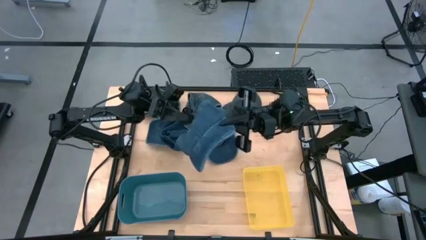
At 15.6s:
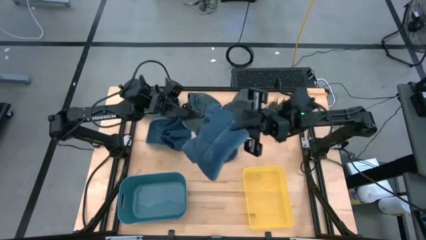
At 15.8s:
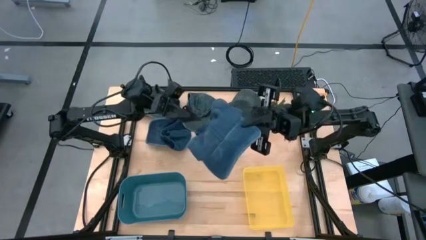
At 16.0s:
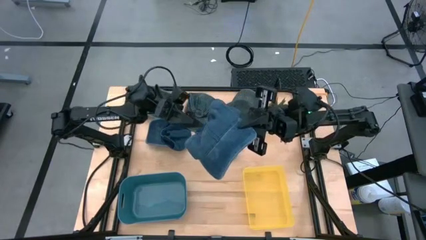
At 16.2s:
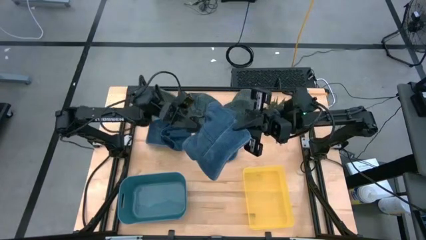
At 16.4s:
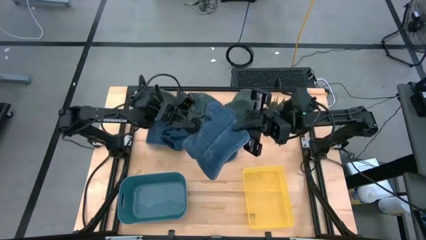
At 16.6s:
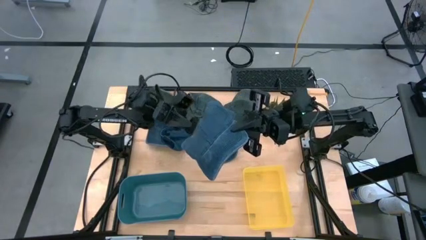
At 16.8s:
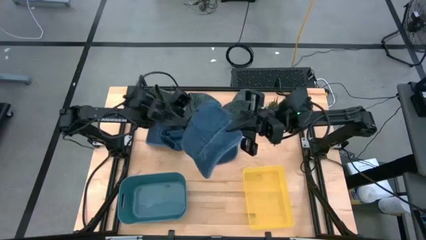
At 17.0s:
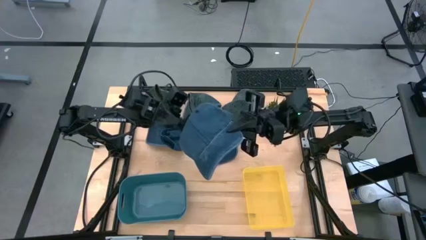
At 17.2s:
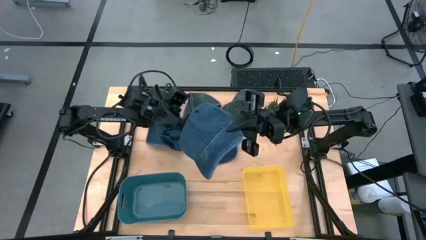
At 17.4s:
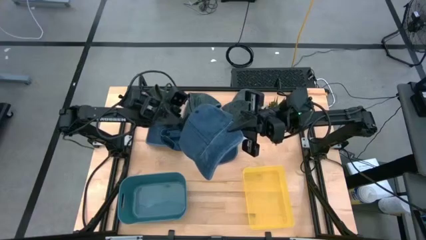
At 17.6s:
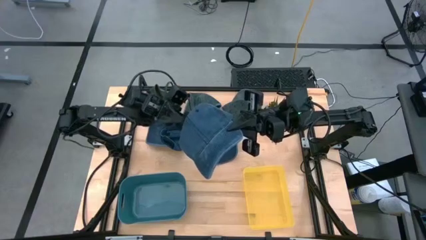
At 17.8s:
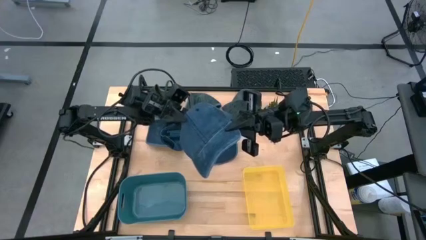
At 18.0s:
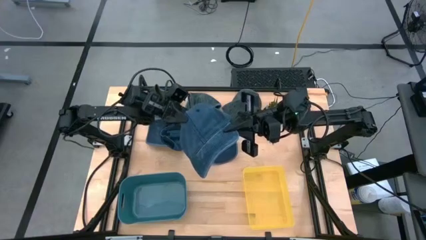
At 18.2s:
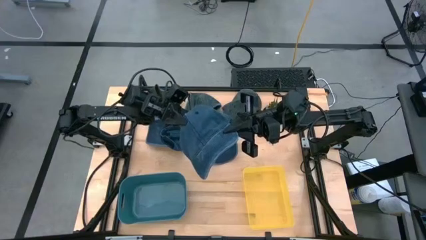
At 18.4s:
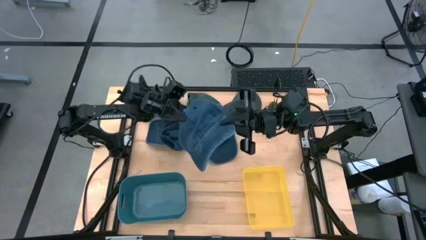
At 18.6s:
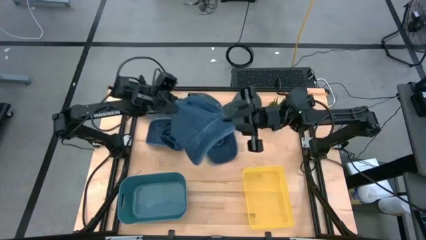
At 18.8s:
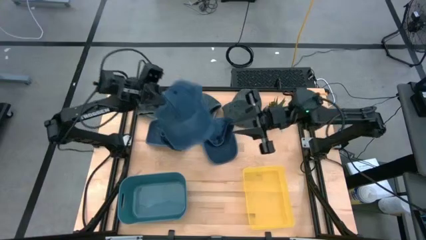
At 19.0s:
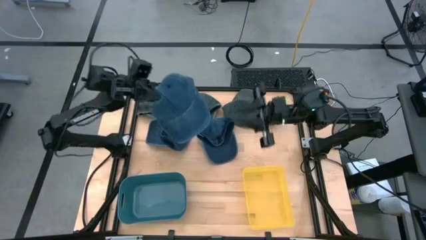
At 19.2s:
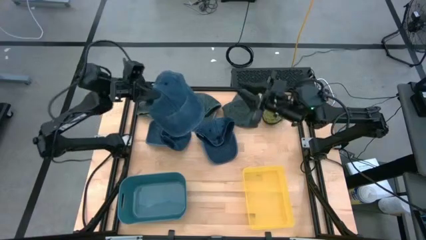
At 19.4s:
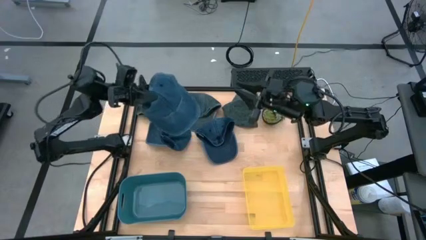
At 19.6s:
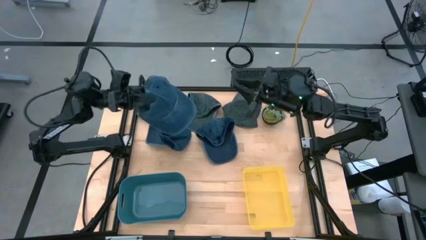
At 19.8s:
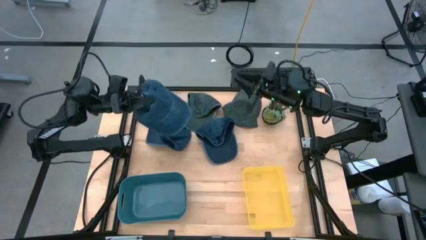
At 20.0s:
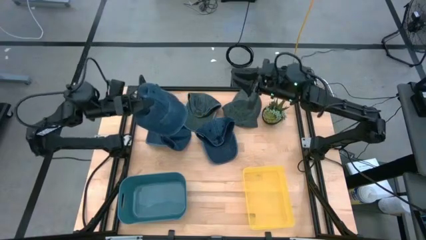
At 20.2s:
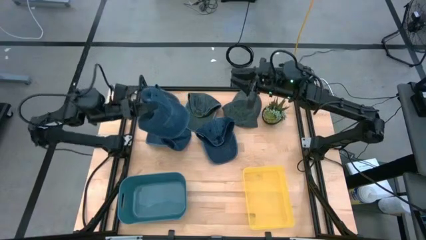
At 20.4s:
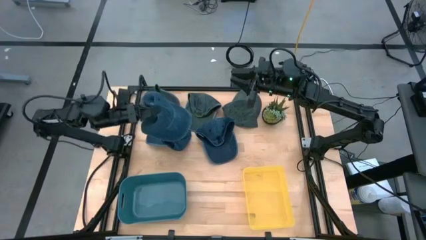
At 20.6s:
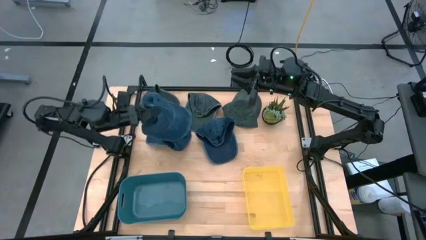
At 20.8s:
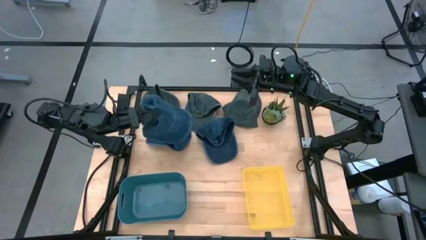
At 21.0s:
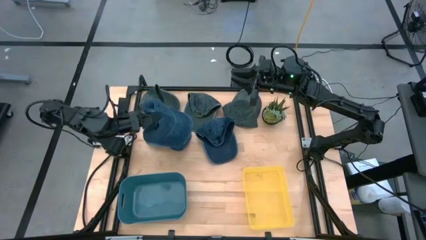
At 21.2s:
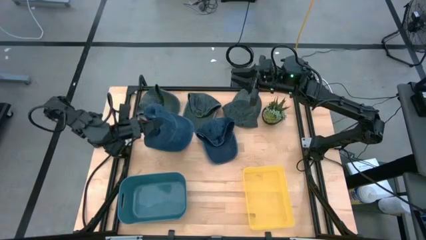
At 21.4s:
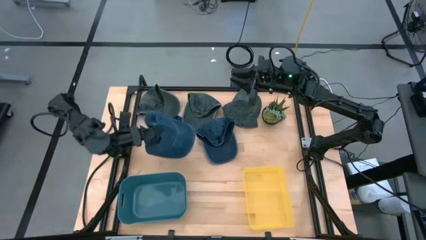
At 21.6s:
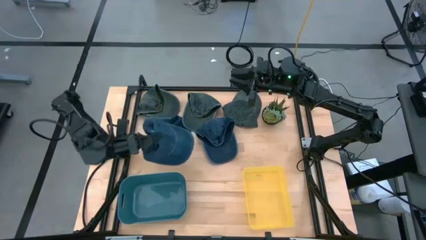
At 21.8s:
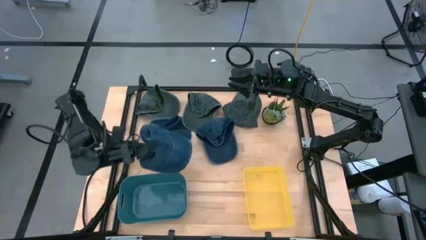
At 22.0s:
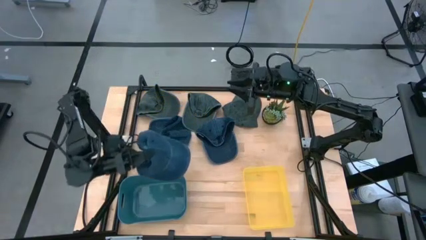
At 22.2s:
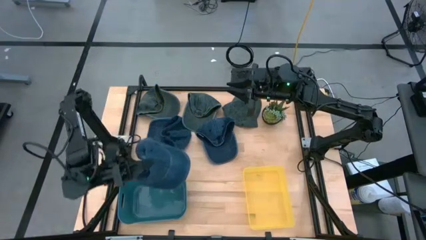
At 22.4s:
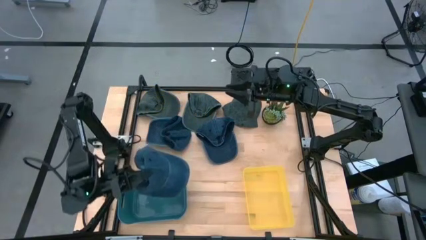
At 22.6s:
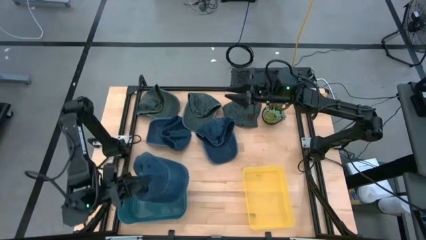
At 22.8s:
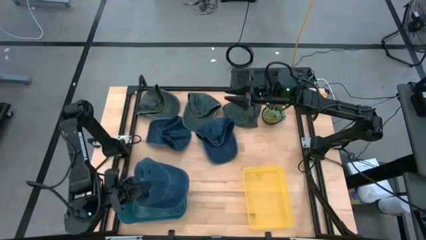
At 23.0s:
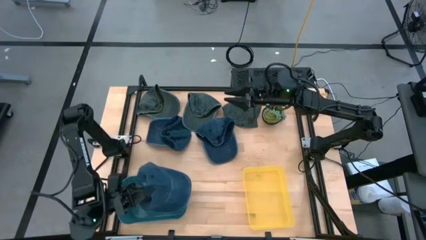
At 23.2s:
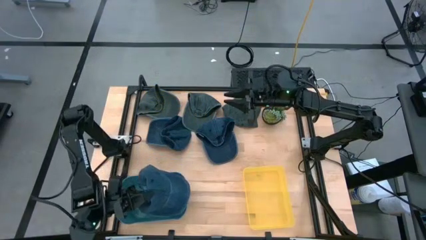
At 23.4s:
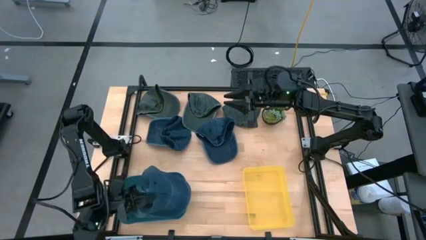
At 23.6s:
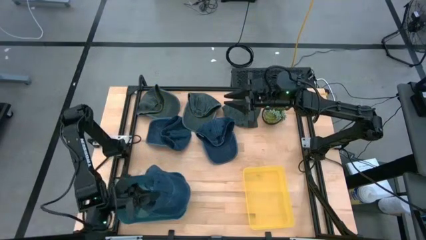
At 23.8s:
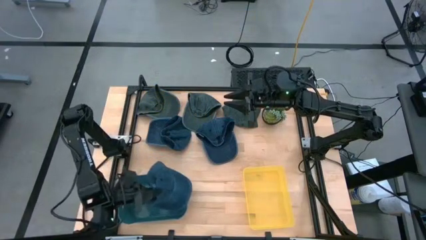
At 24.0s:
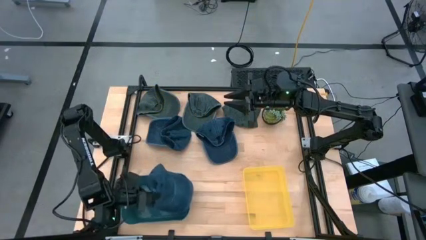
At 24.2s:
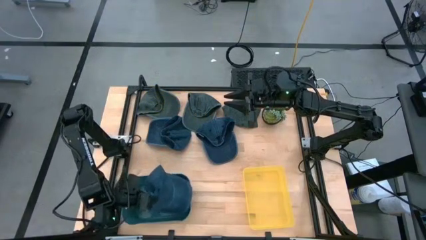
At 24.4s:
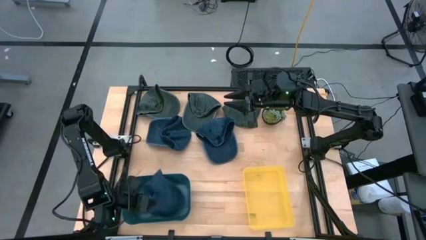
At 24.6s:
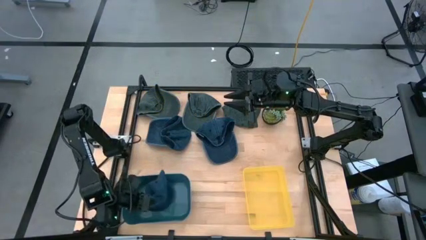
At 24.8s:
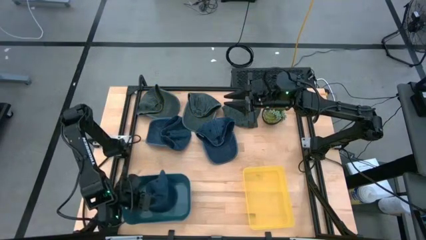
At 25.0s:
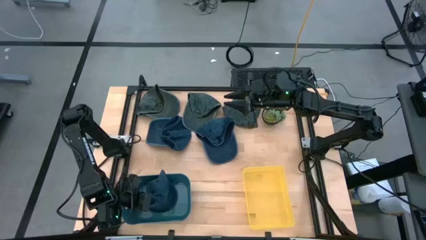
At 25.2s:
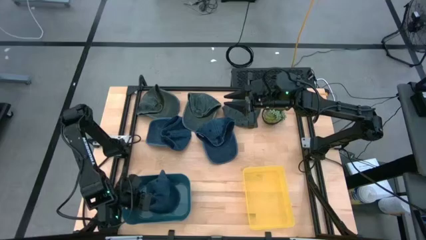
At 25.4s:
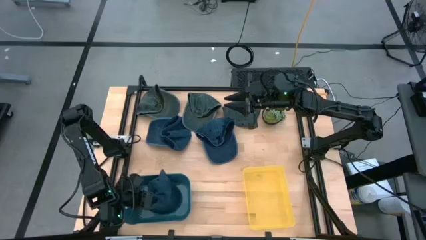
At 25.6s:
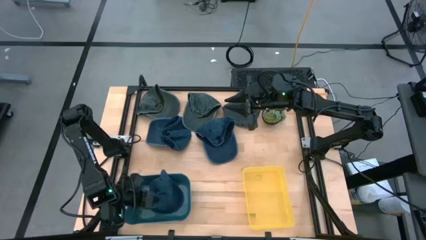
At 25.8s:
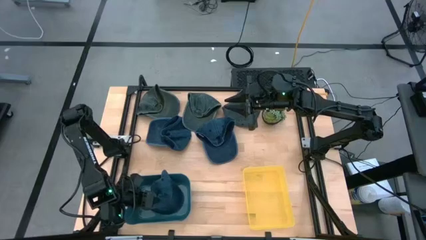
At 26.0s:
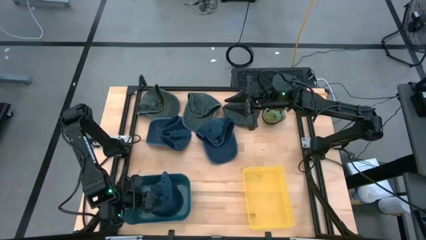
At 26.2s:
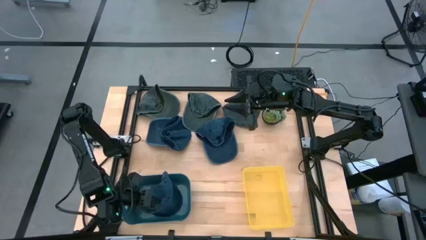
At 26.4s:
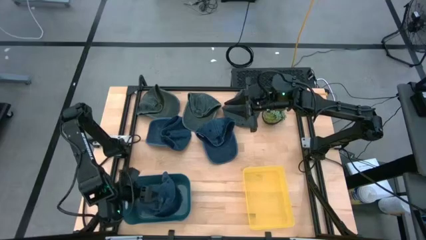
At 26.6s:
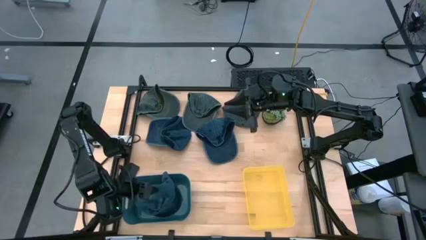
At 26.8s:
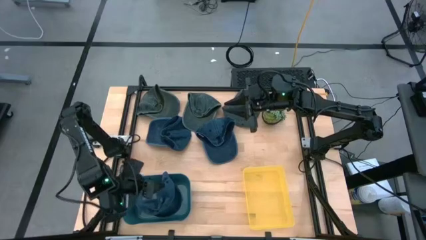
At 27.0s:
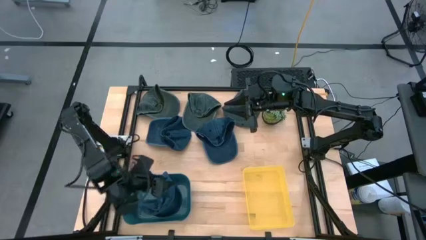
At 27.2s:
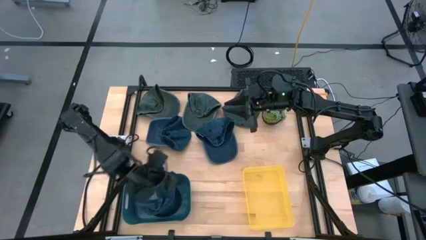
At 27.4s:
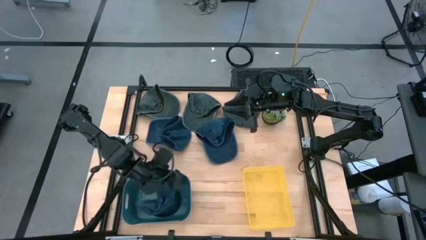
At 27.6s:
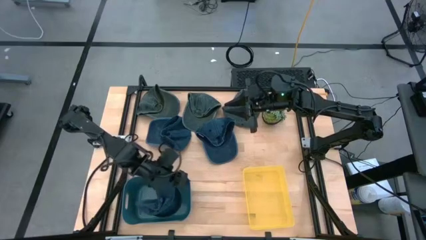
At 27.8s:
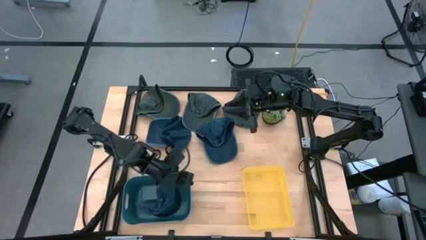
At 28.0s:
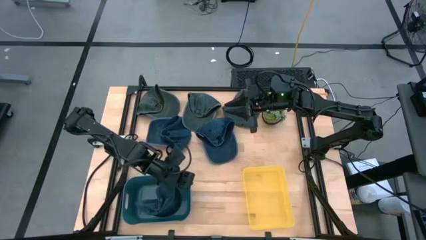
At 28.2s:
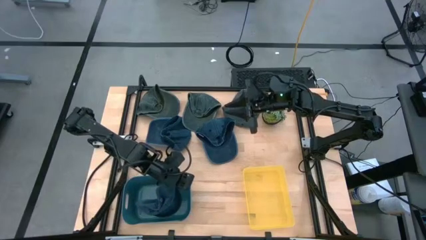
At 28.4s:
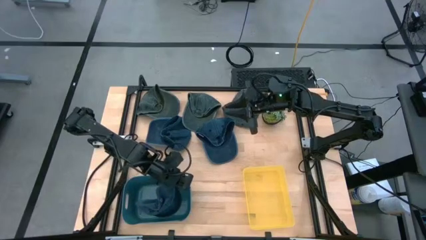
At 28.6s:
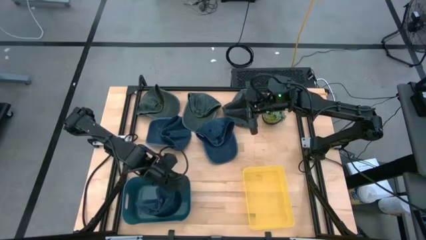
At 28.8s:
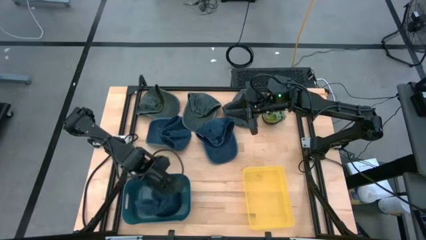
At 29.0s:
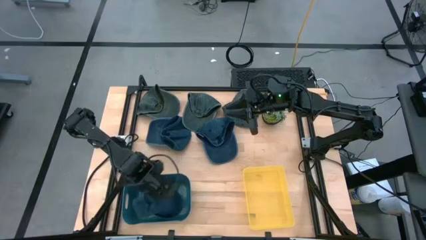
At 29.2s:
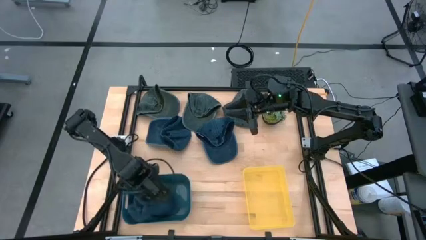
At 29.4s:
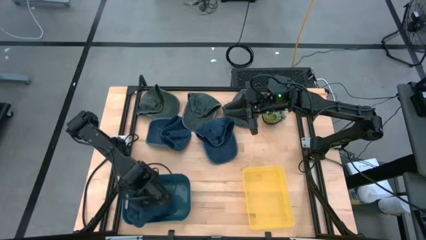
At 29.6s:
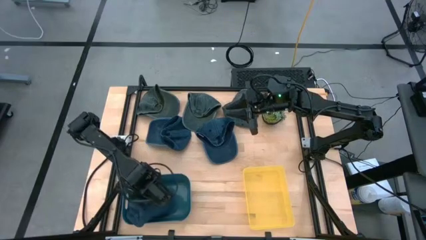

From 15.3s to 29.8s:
Task: Pick & Place hat
Put the right dark blue cap into the blue bin

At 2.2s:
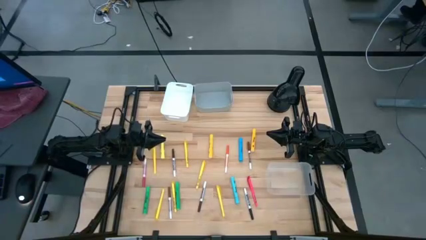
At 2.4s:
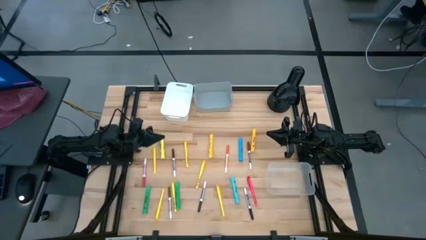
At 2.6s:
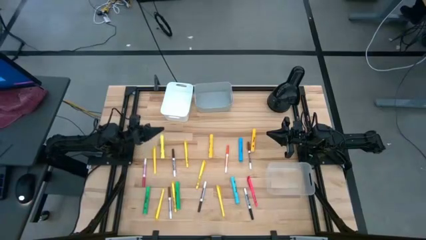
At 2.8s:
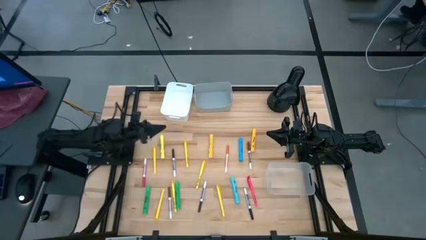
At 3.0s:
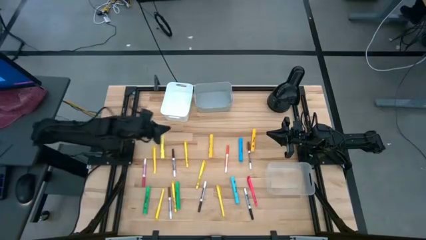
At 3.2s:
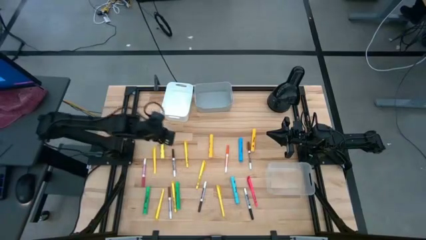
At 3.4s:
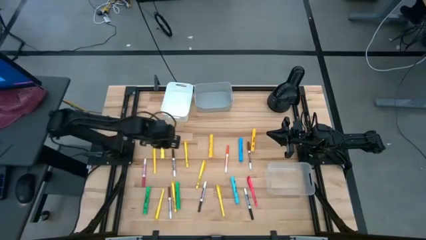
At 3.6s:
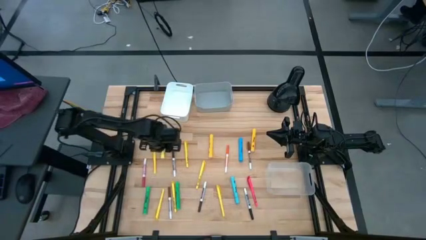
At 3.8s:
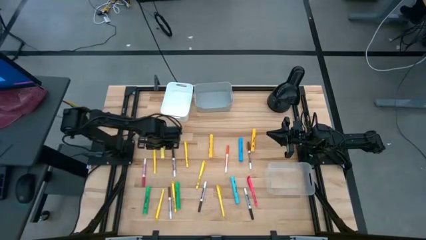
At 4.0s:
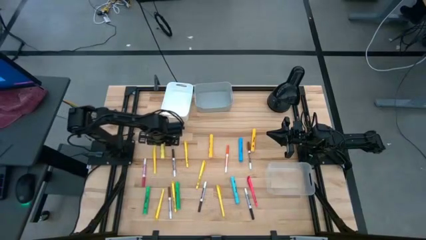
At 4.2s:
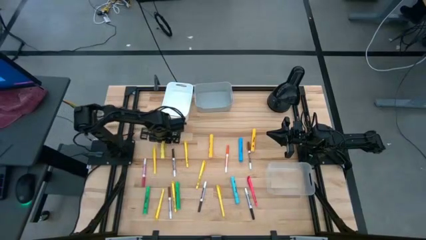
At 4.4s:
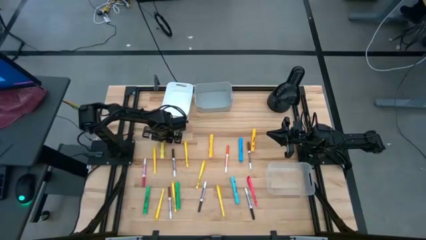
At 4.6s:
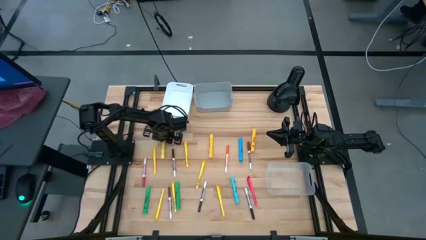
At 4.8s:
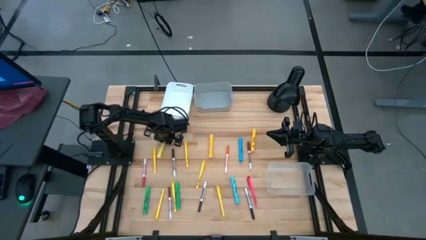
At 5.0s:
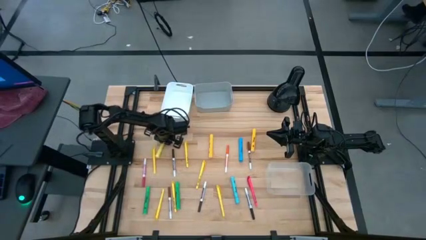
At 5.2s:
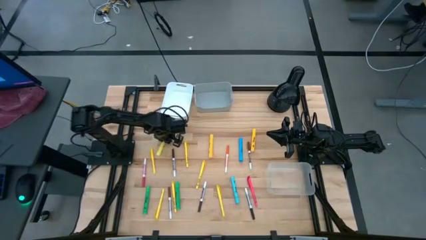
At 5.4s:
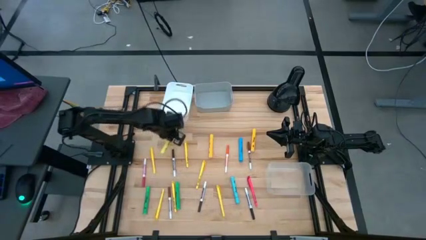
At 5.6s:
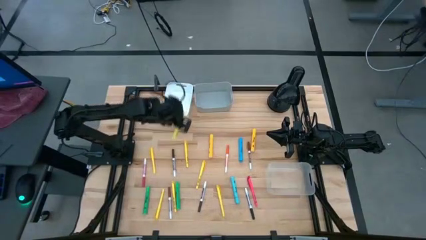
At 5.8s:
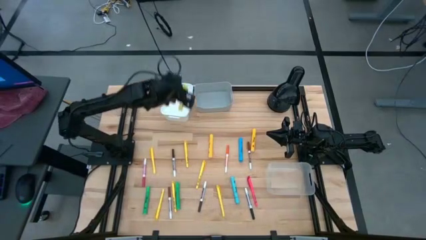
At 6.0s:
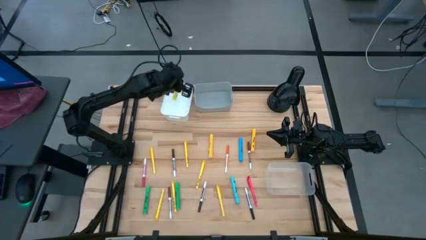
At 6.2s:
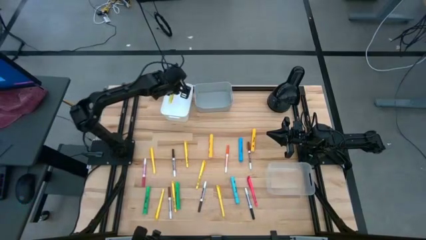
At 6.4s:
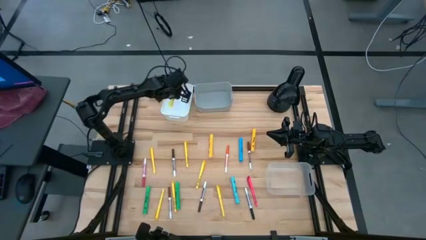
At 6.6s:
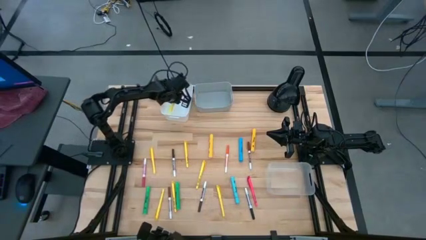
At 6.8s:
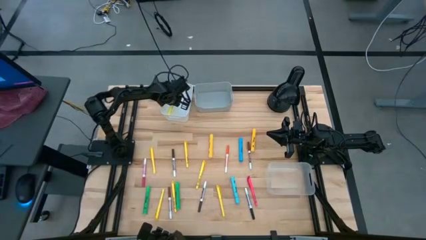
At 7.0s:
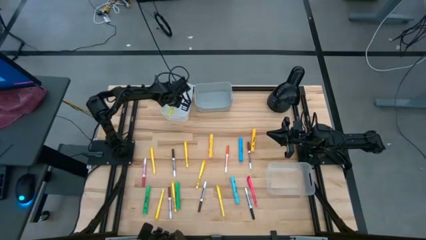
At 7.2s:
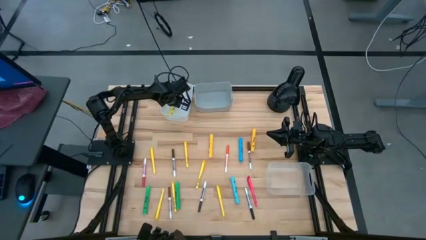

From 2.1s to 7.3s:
Task: Pick & Place Markers
Put the yellow highlighter pen into the white bin
